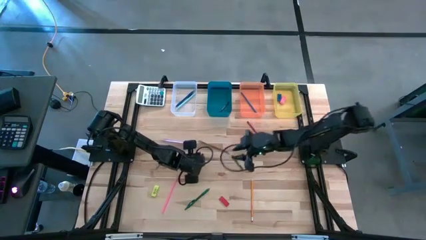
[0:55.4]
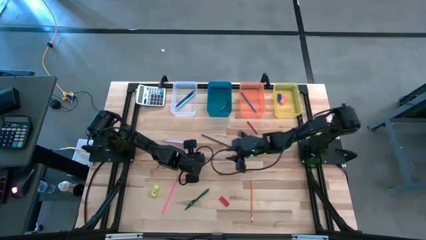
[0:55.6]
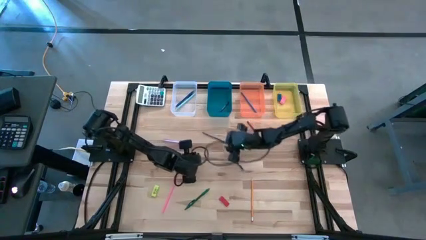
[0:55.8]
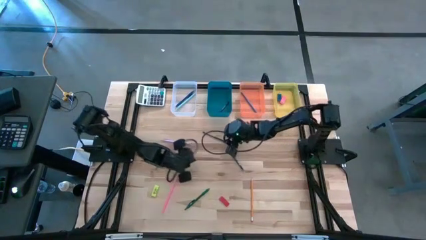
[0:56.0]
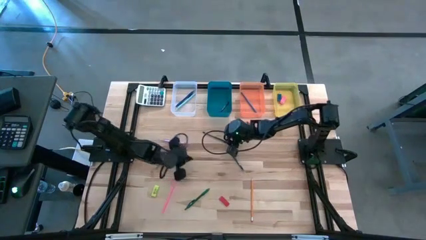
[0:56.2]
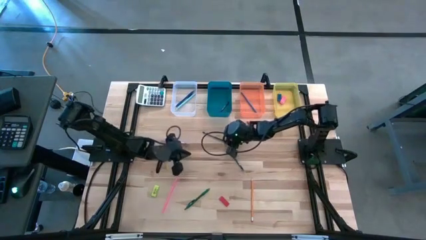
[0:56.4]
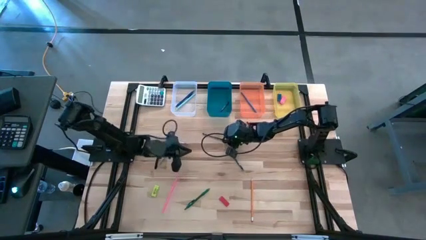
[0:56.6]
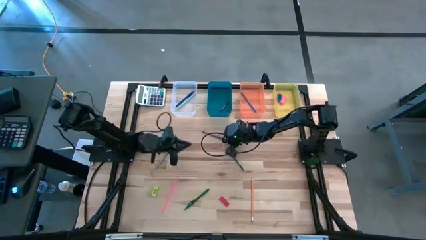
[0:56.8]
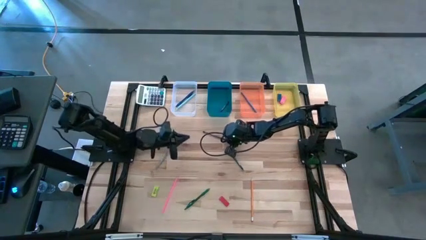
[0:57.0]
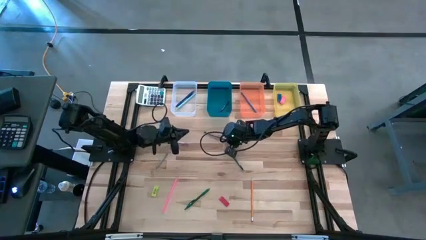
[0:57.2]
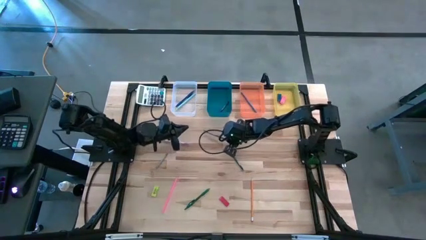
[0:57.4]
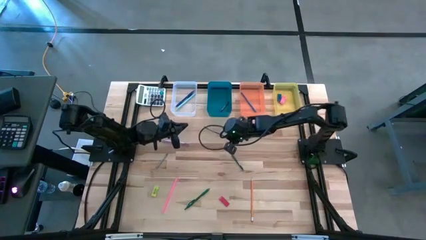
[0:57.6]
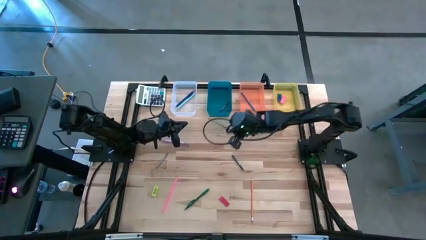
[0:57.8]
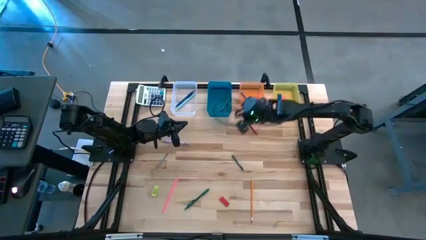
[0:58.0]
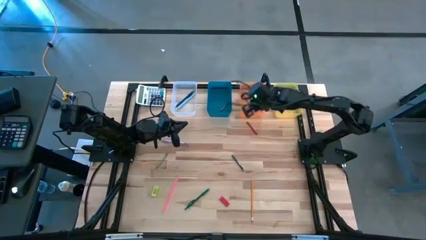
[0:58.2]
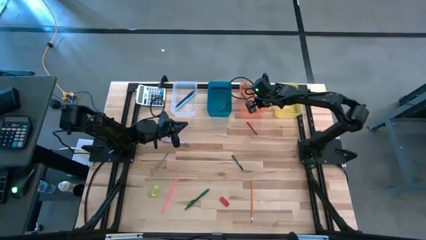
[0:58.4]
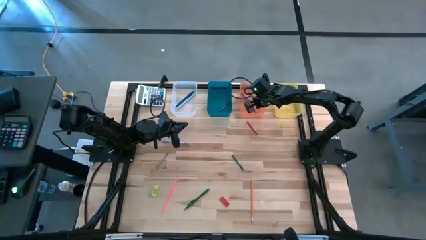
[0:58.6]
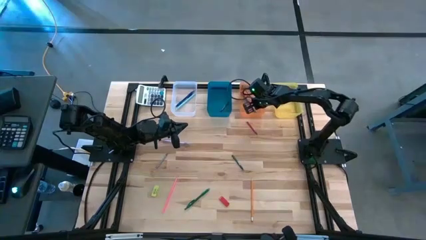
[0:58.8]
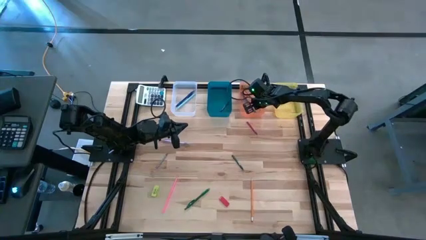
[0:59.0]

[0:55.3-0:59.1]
Task: Sort crayons/erasers/pens/pencils in bins
Put the dark blue pencil into the orange bin

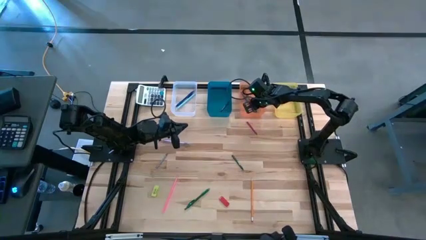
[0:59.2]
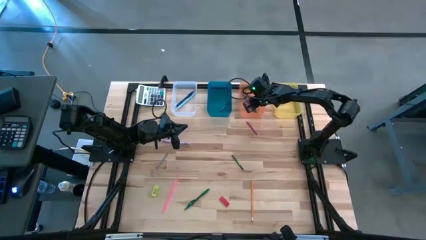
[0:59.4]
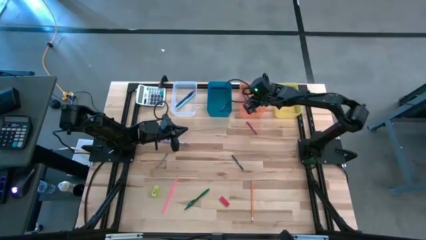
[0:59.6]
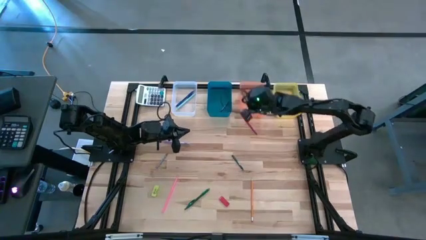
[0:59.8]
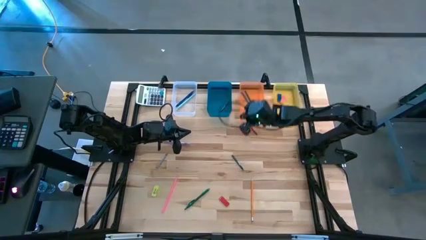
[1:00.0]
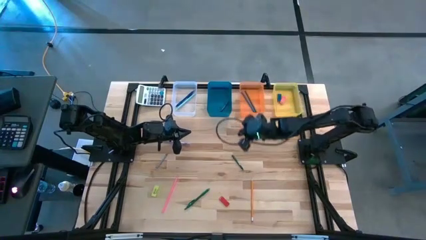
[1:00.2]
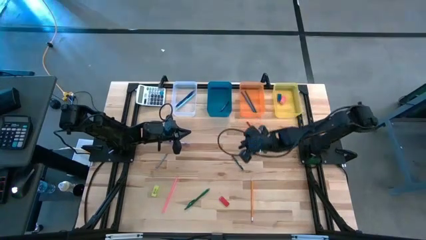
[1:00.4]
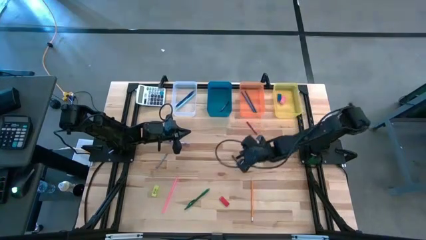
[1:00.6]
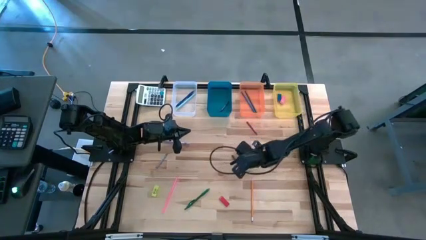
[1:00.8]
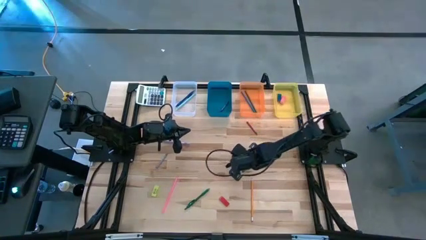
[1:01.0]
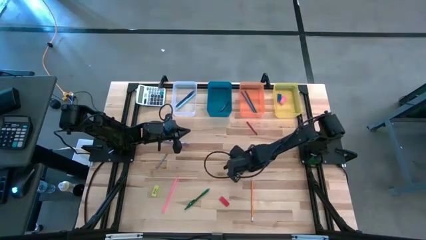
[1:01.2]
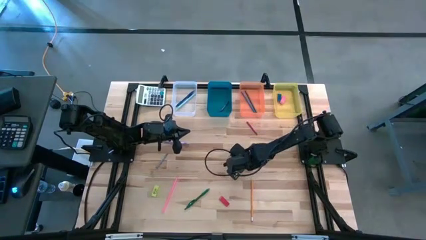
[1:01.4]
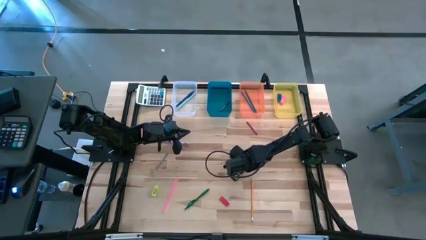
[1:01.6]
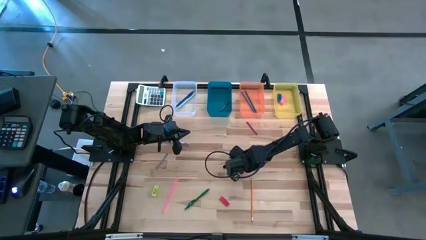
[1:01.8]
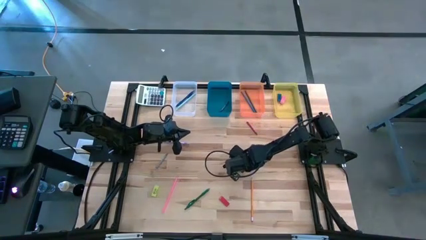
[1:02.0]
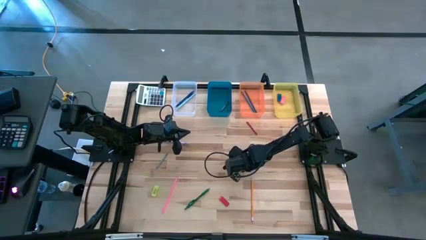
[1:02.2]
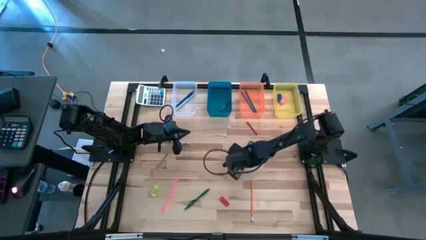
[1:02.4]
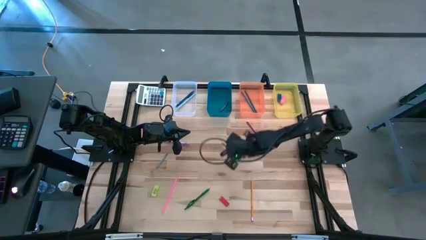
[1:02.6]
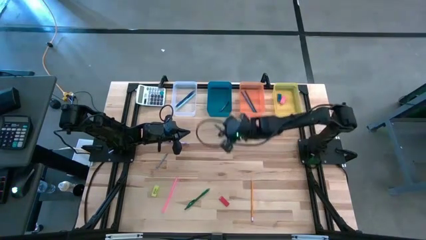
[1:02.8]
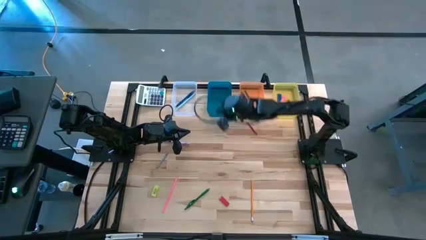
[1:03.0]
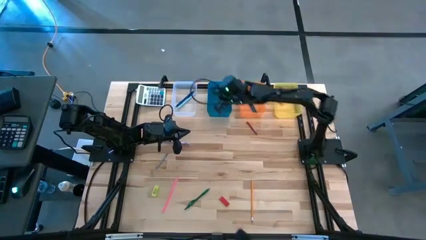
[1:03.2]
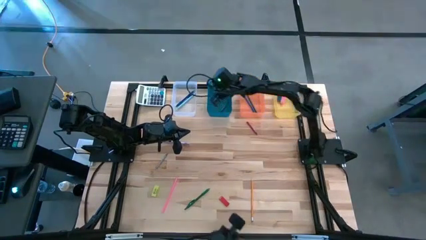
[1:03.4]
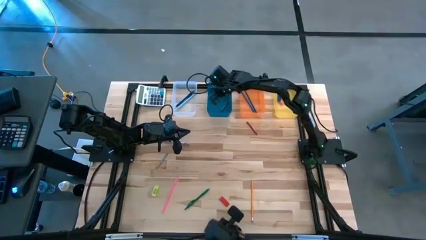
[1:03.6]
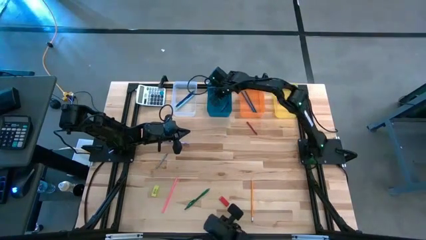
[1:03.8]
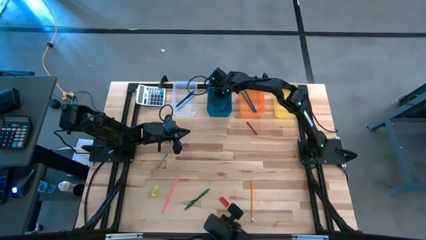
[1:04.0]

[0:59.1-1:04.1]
Put the green crayon into the blue bin

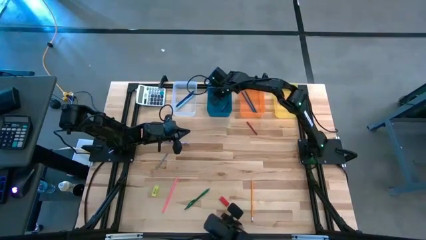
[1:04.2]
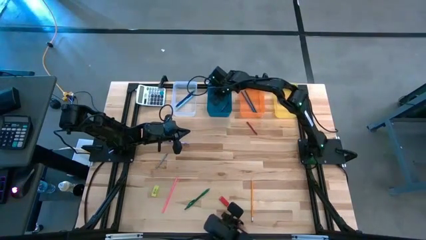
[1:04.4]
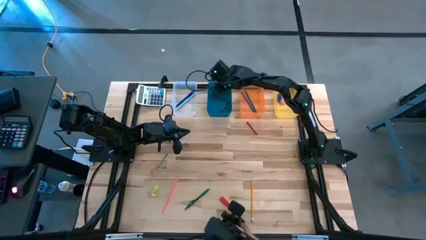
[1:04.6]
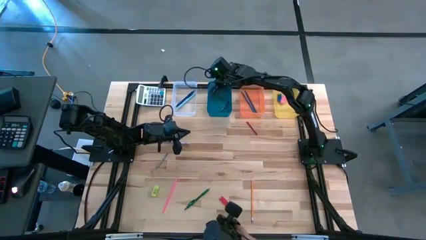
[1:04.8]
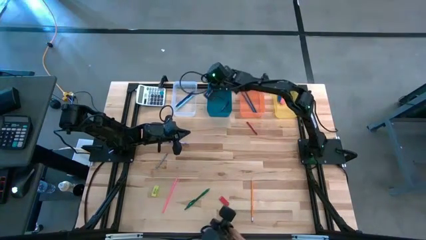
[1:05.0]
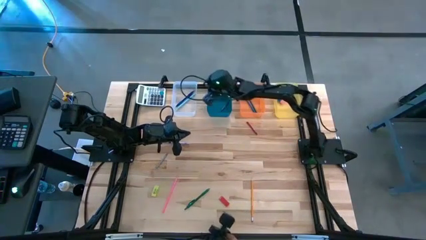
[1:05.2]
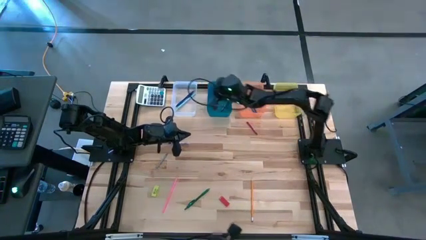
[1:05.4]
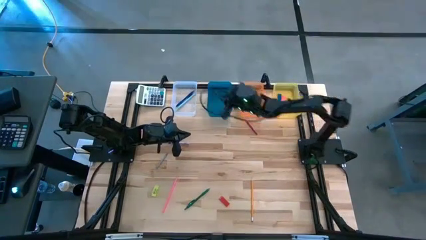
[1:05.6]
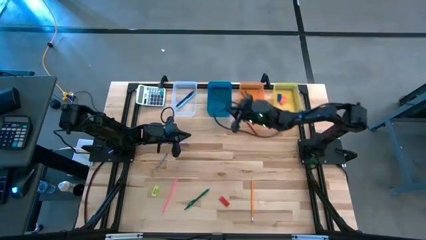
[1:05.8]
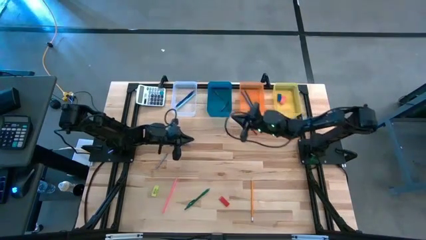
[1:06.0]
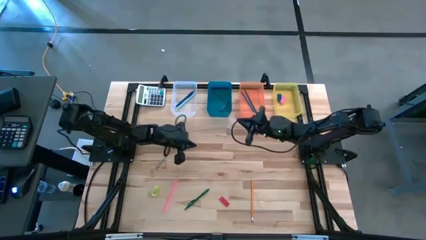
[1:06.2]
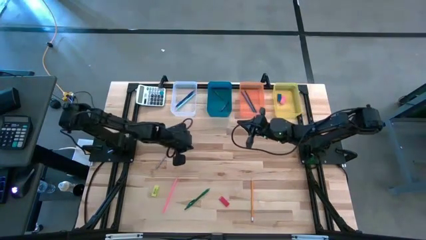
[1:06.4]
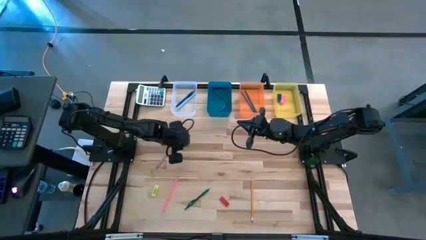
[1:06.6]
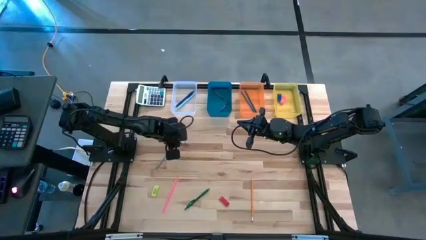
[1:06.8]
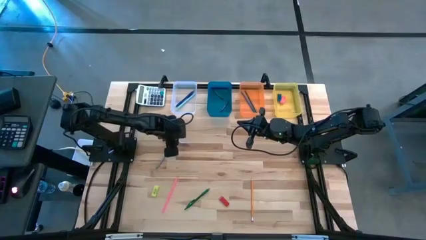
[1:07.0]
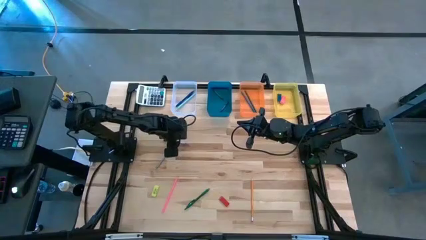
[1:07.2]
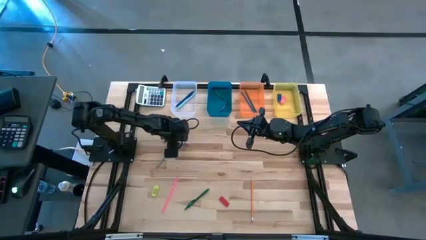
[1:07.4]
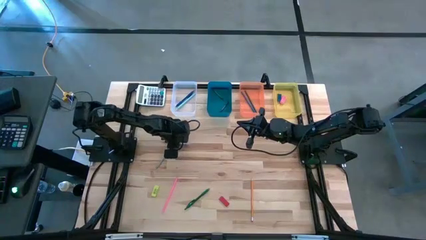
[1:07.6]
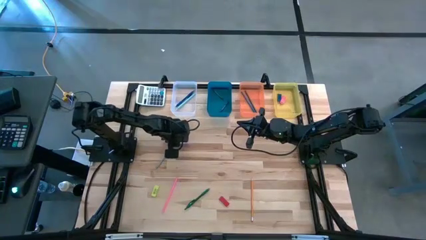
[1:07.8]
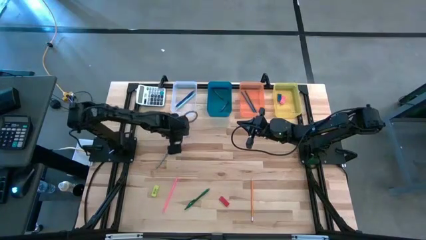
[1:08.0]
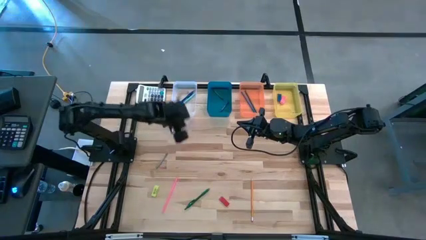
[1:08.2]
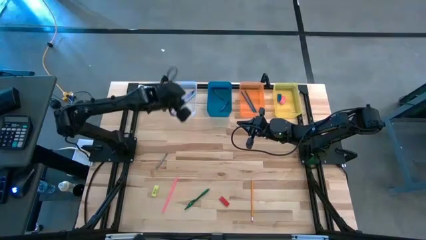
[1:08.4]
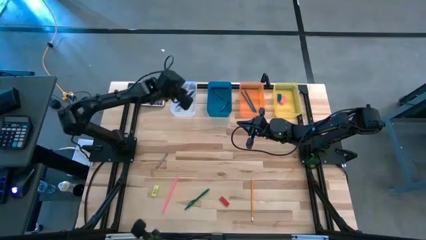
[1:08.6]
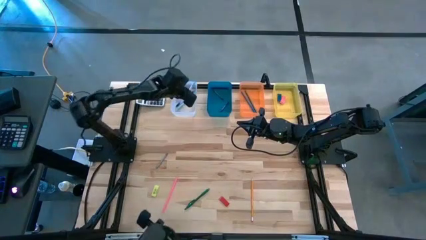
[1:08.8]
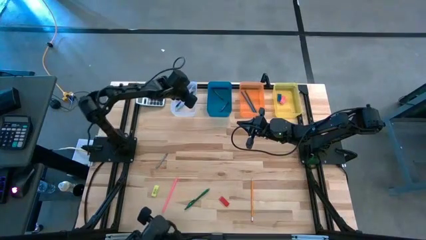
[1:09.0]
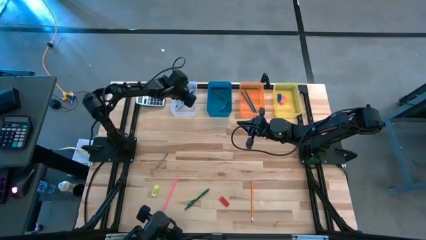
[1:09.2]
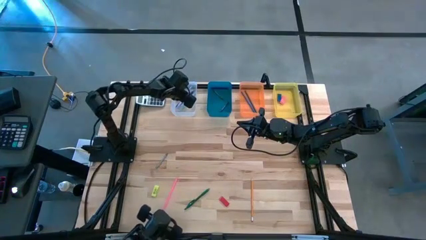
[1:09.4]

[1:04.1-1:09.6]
Put the purple pen into the transparent bin

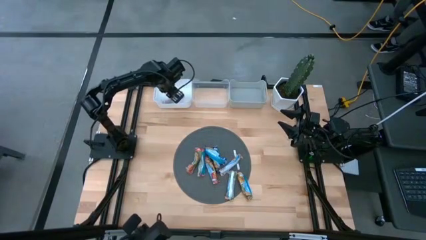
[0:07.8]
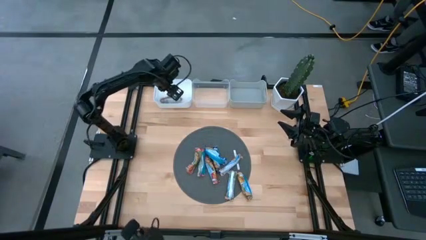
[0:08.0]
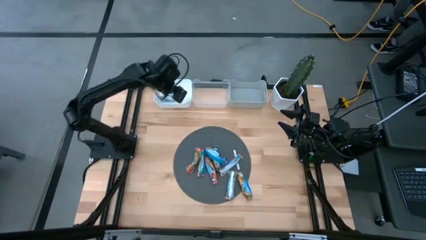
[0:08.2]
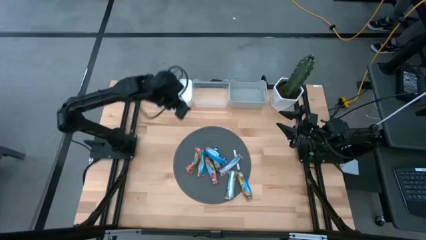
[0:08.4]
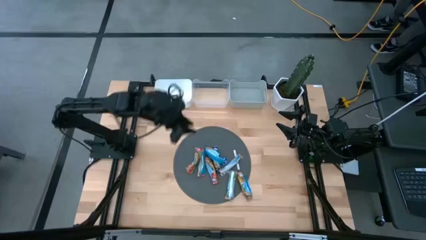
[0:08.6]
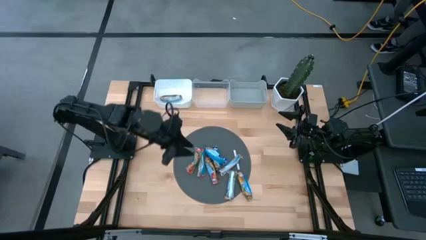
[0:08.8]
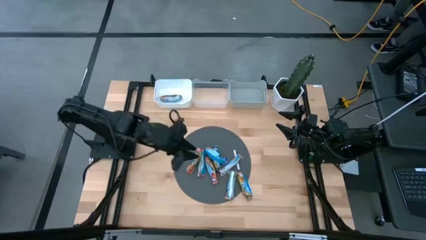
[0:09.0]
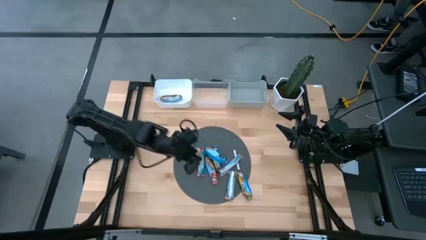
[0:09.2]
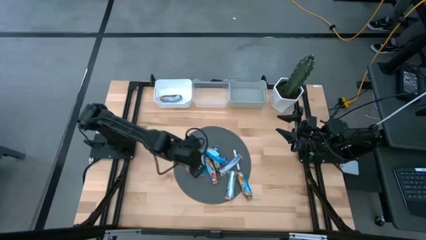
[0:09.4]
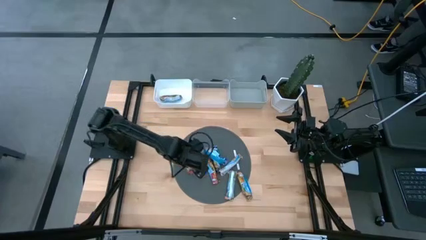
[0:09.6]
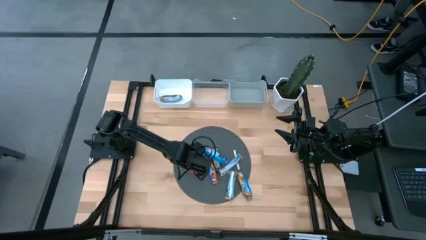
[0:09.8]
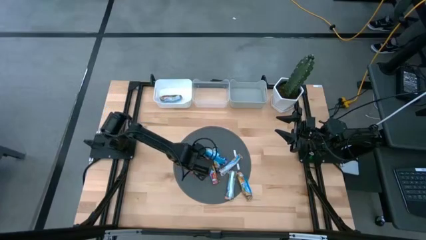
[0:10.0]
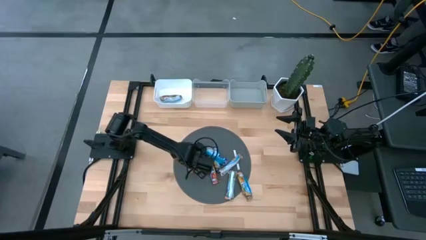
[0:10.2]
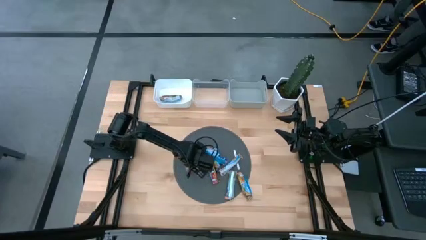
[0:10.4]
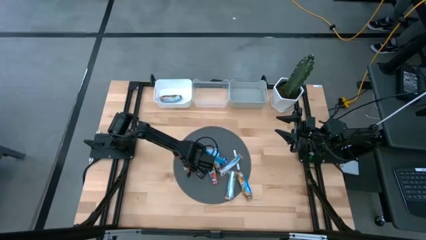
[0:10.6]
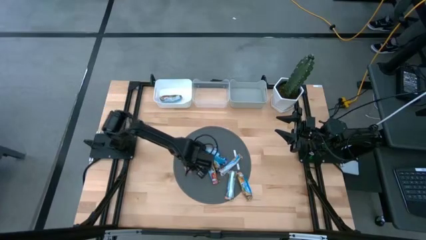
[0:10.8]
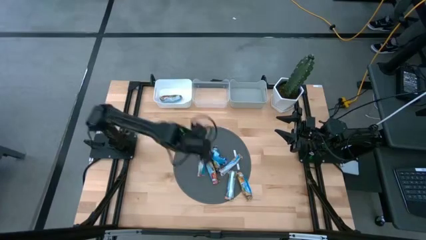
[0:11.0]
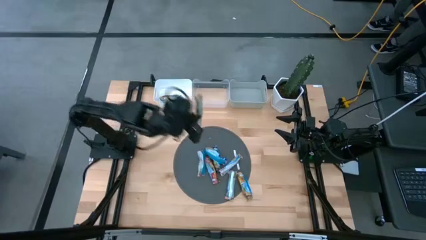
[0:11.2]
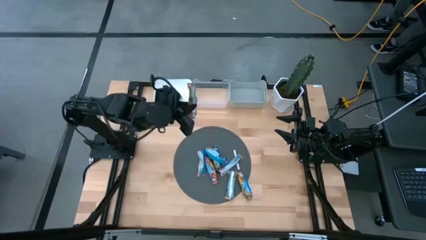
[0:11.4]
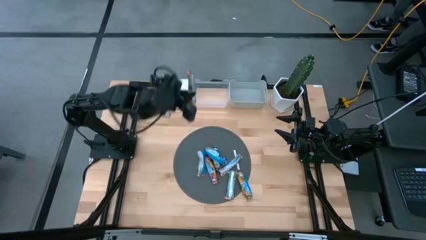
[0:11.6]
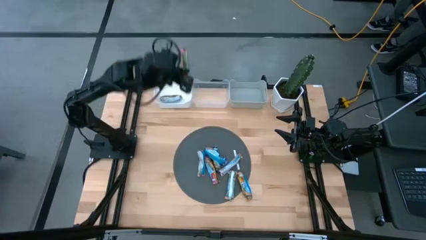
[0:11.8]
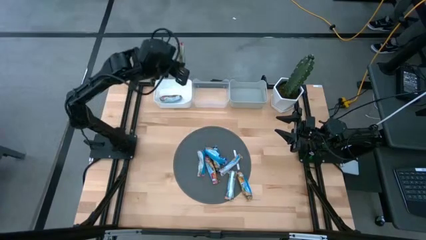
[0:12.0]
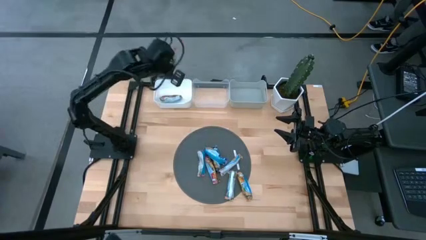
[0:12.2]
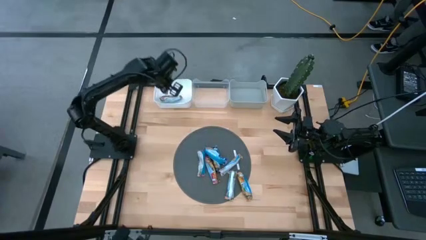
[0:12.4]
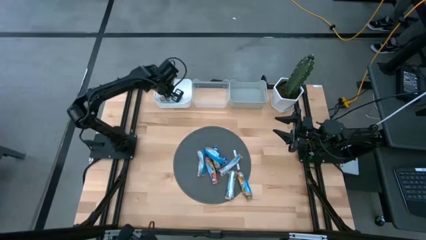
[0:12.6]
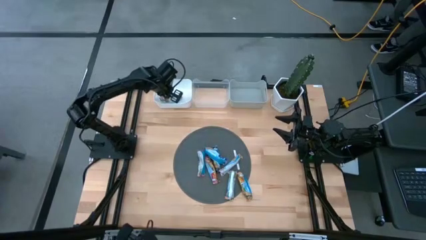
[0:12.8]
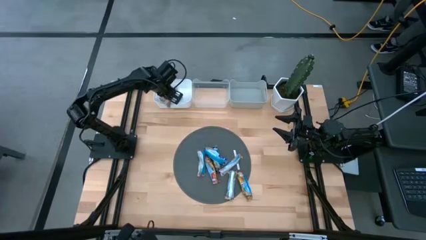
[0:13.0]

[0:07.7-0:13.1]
Task: Pick and place Granola Bars by type
Put the red granola bar into the white bin
